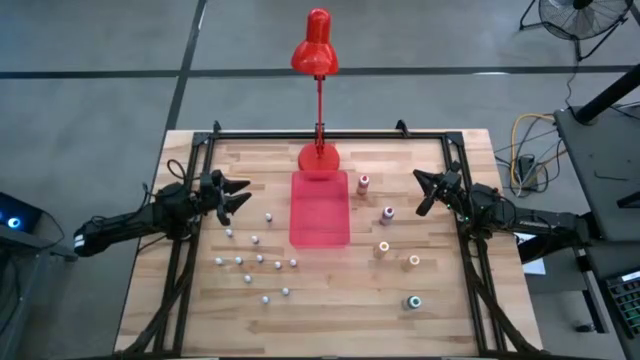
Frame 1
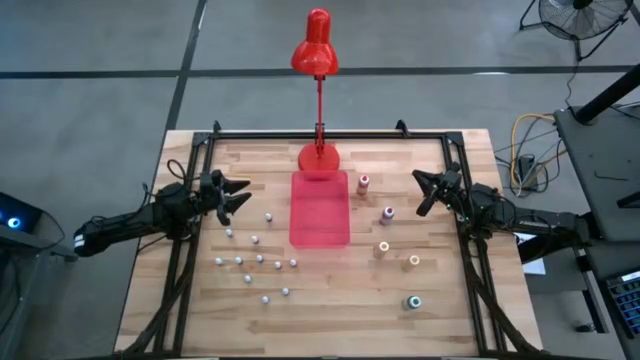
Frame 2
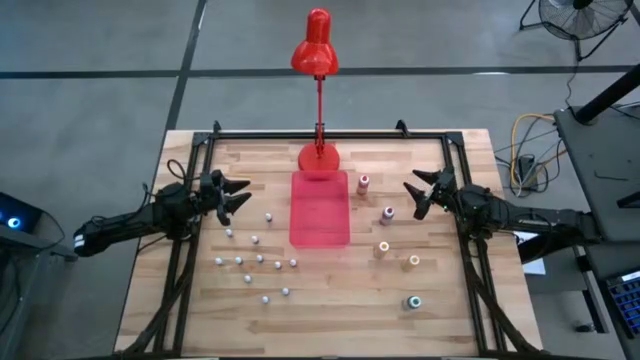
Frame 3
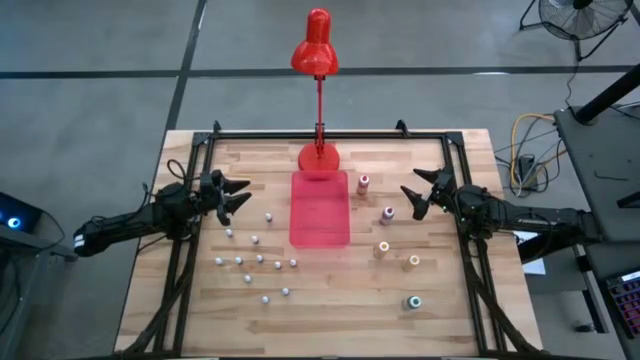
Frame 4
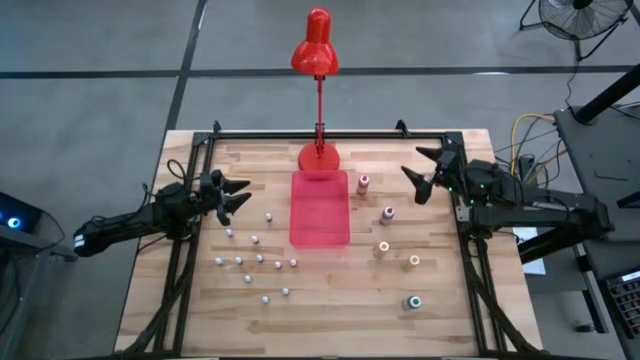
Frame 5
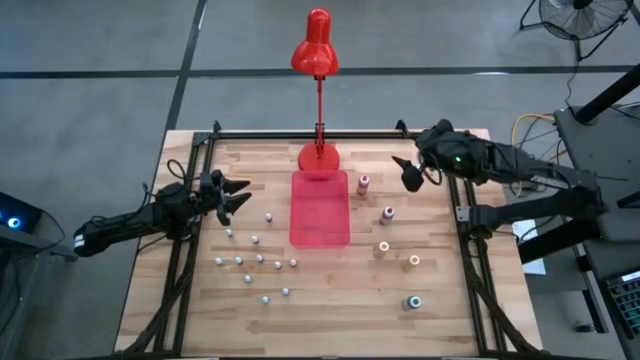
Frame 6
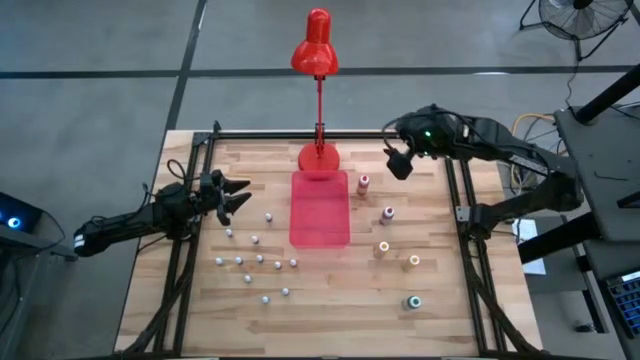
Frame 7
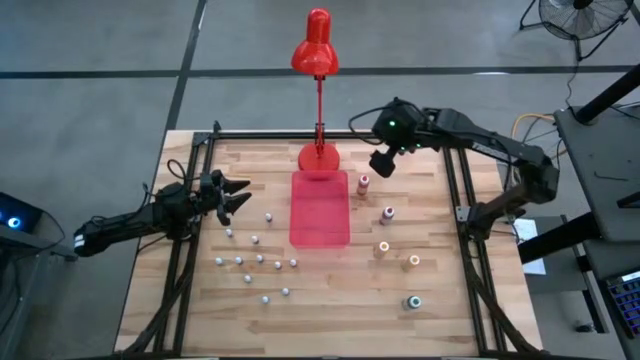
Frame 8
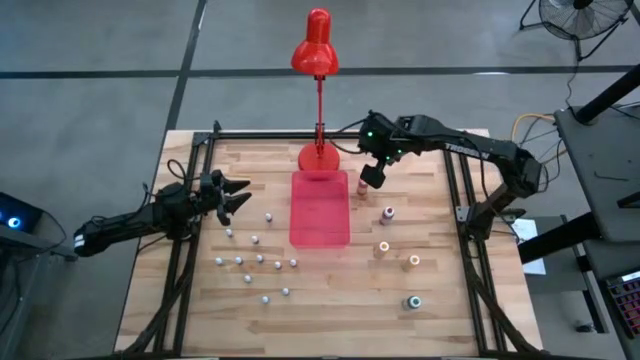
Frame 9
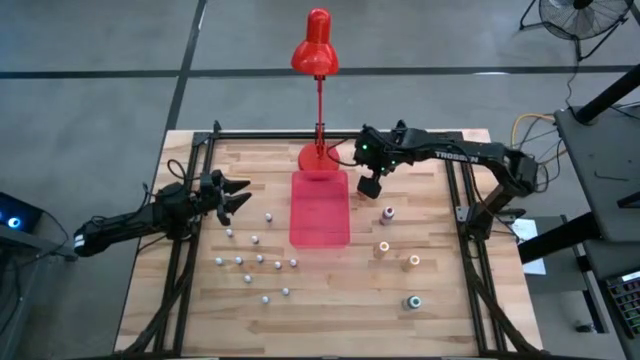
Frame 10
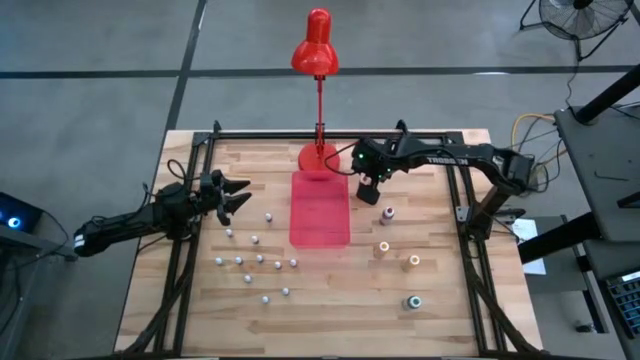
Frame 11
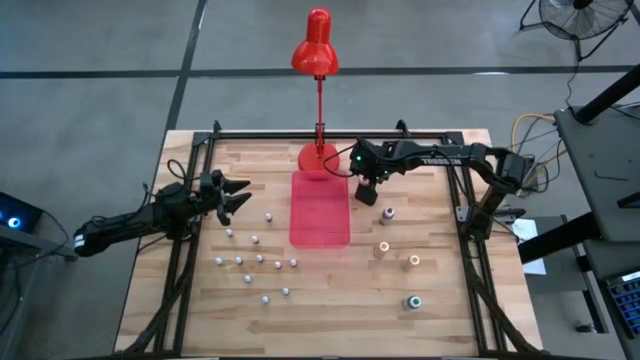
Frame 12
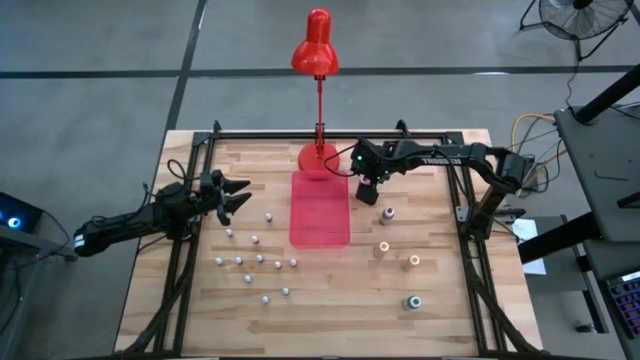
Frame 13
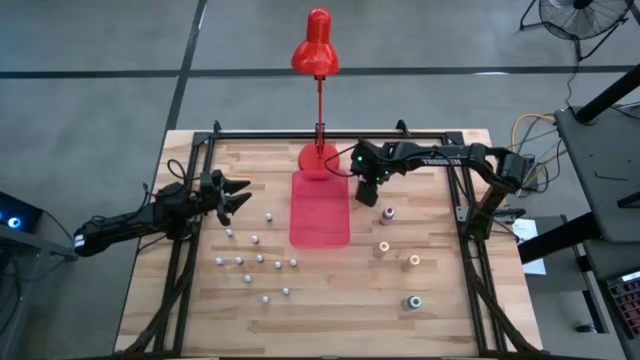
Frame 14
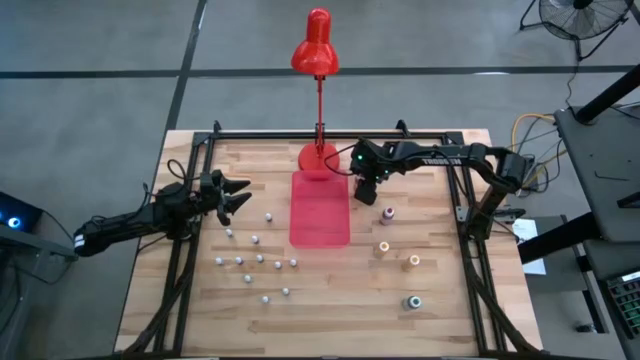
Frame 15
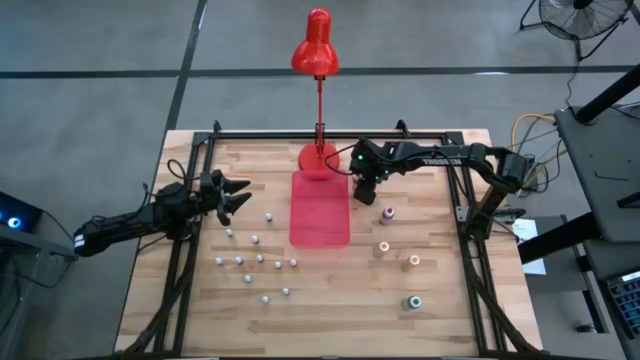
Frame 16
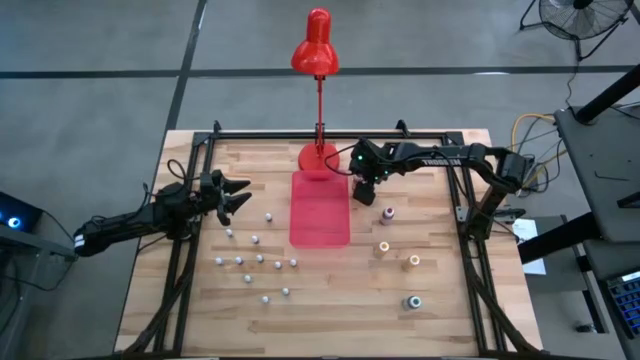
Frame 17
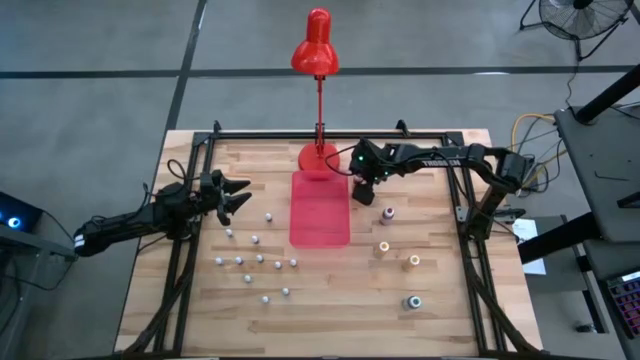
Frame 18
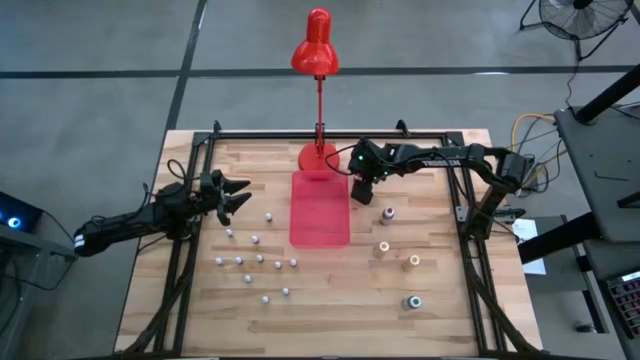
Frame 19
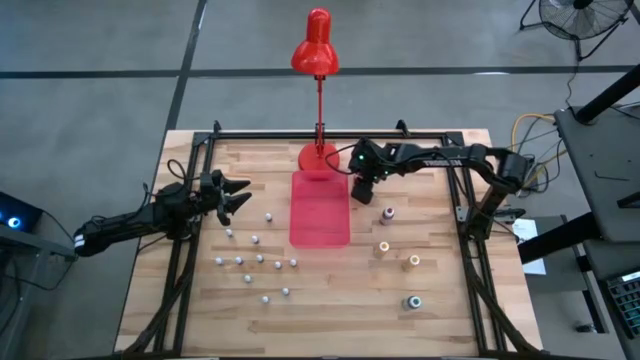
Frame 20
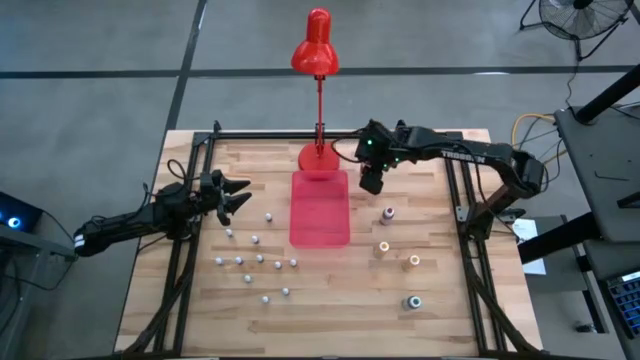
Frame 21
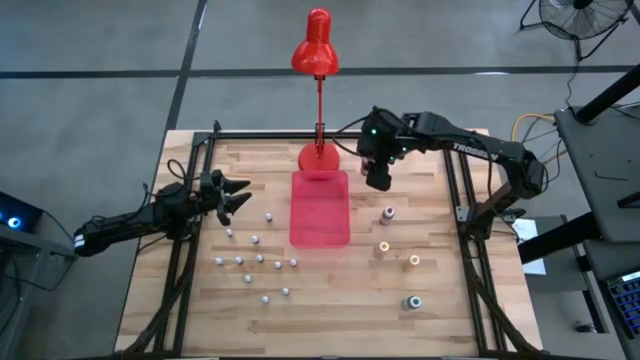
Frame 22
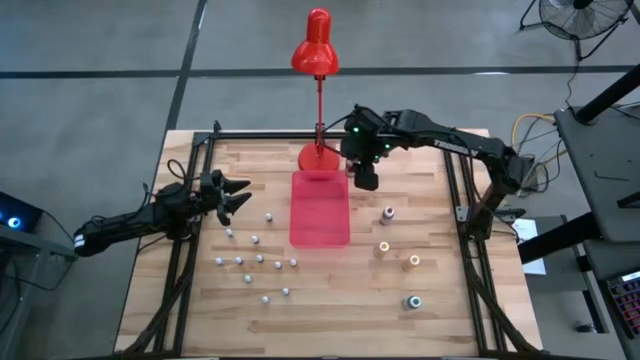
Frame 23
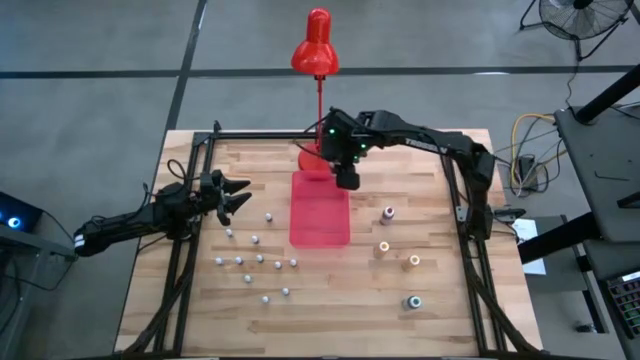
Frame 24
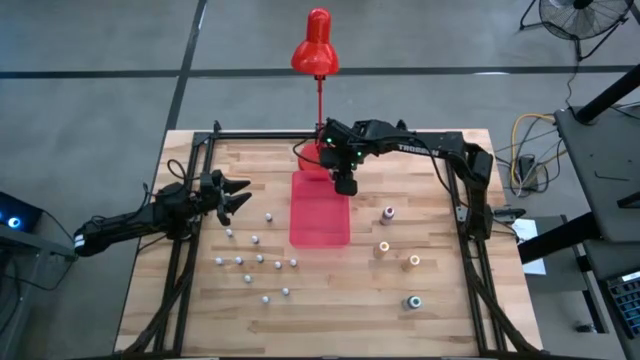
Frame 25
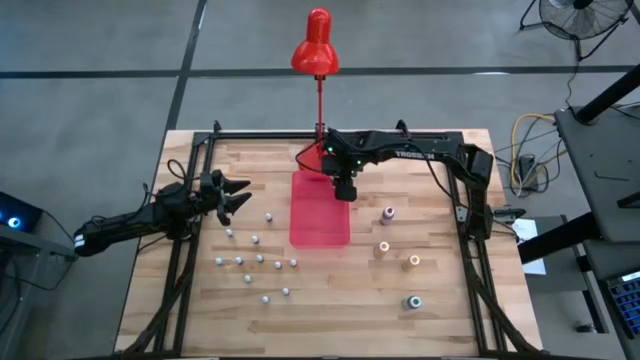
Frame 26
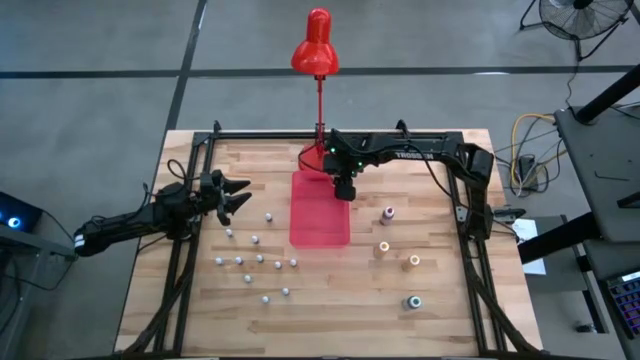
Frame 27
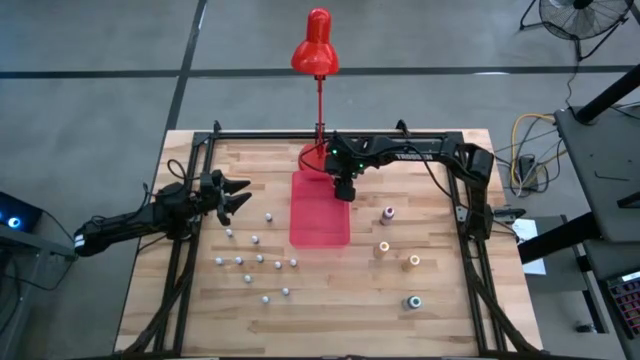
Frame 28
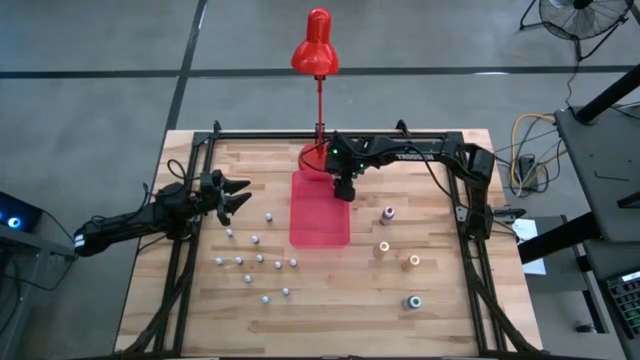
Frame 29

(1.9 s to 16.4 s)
Task: Pick & Place food coloring
Put the big orange food coloring bottle into the pink bin

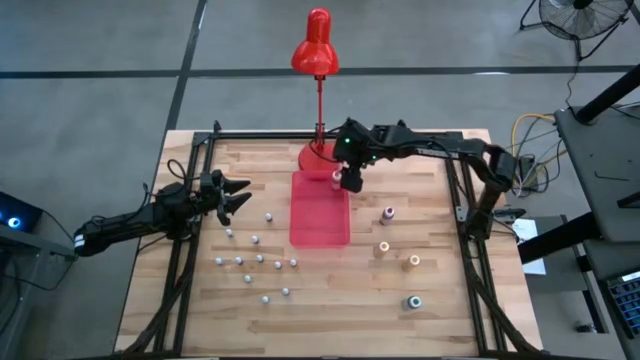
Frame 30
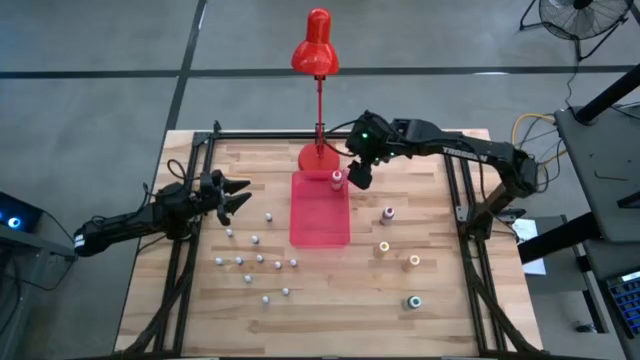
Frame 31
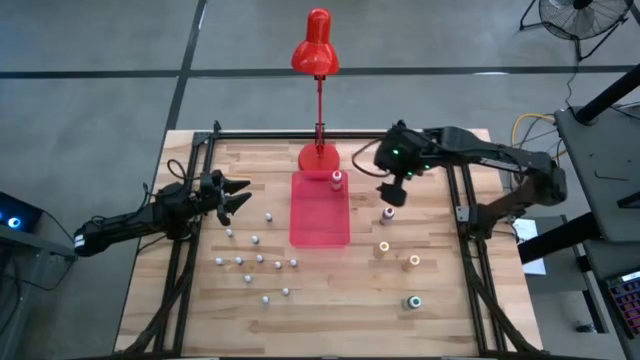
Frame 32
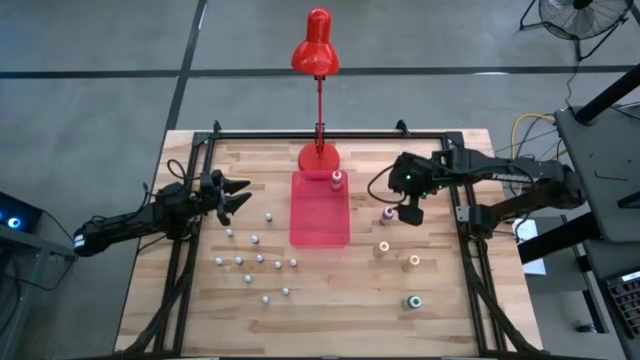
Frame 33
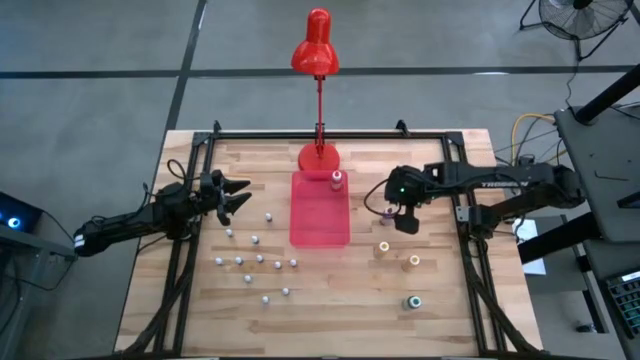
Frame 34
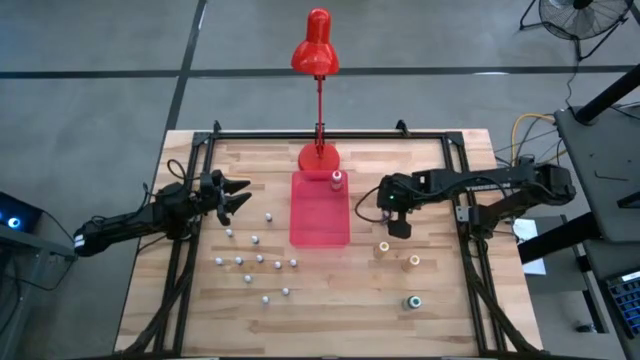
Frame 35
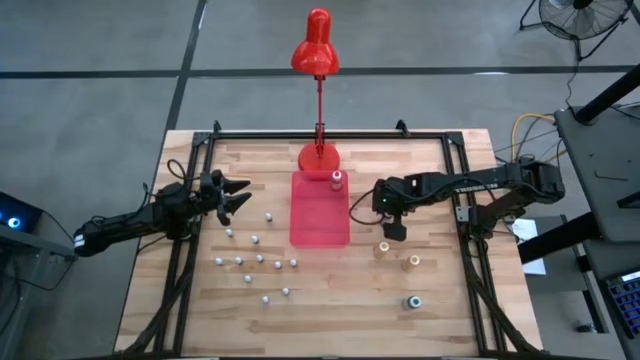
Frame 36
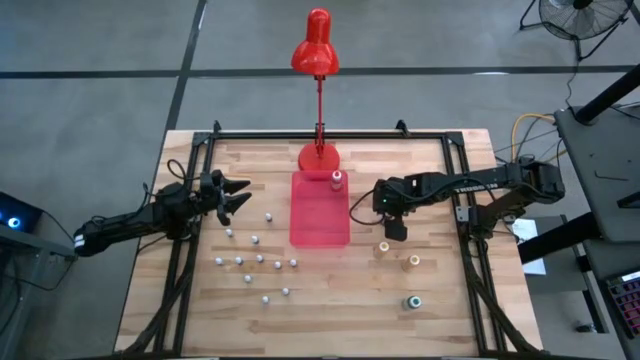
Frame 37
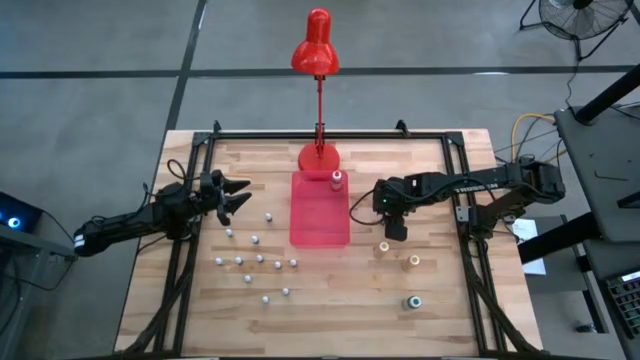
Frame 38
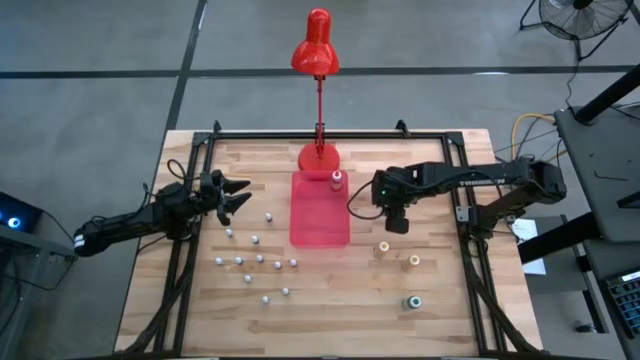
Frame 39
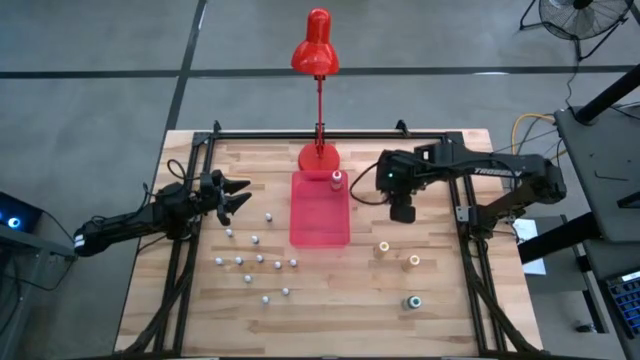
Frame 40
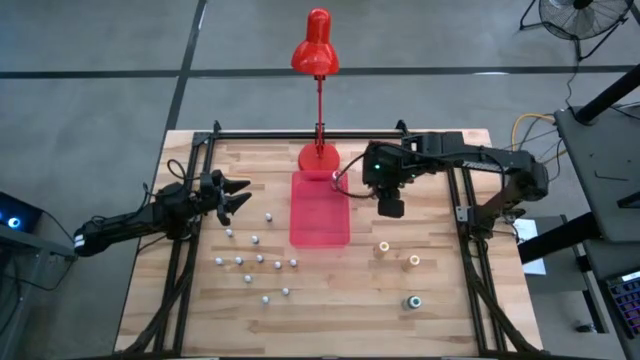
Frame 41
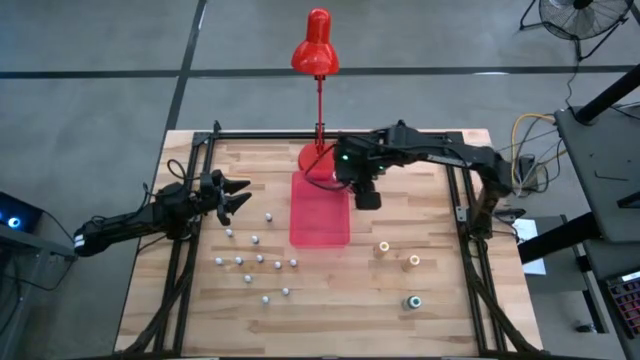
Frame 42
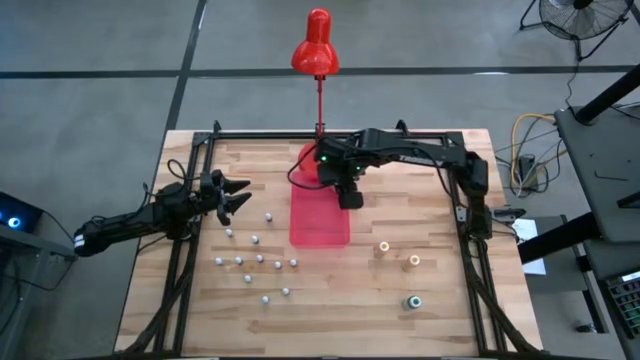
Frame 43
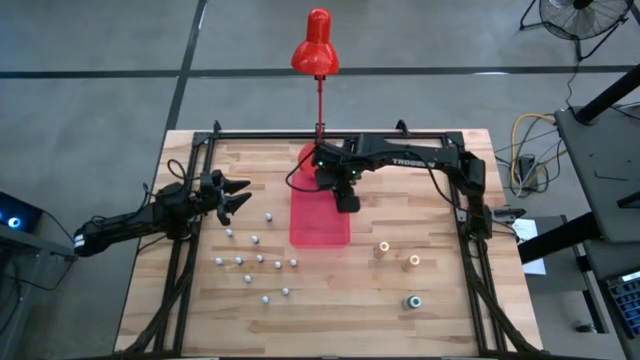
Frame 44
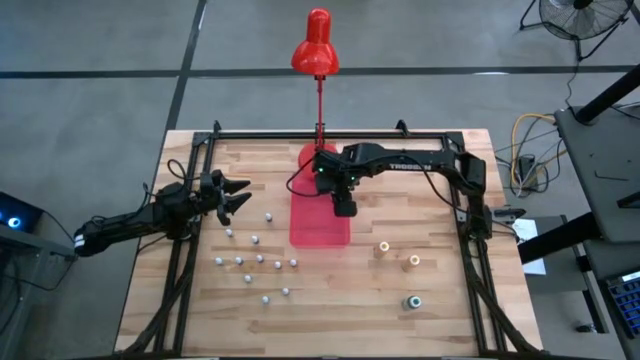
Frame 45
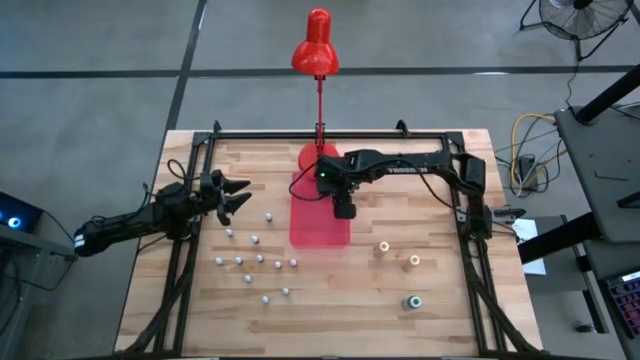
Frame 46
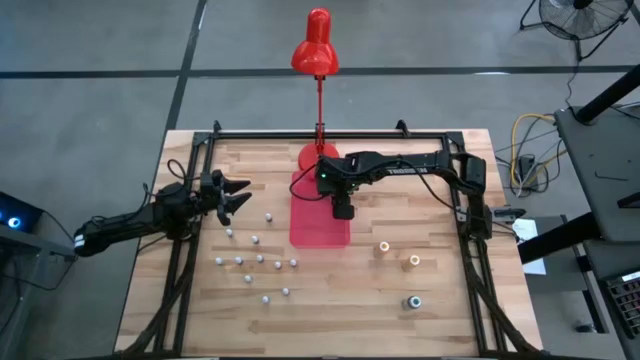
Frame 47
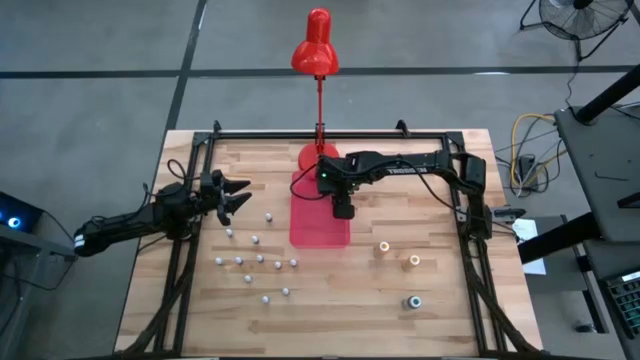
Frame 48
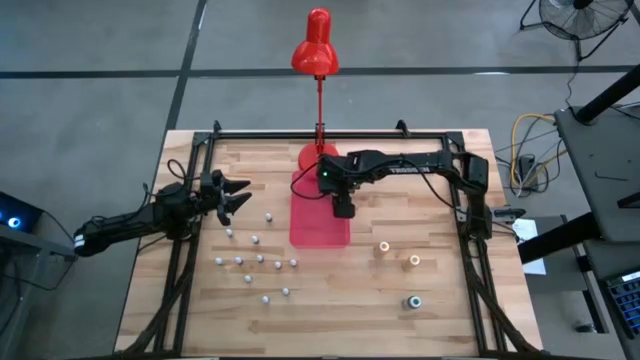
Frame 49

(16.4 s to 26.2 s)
Put the big red food coloring bottle into the pink bin
